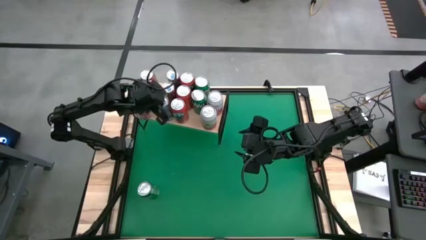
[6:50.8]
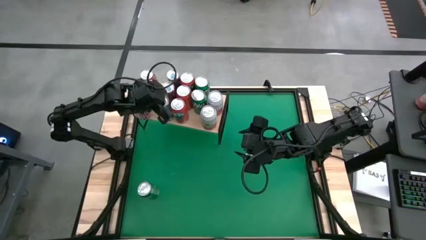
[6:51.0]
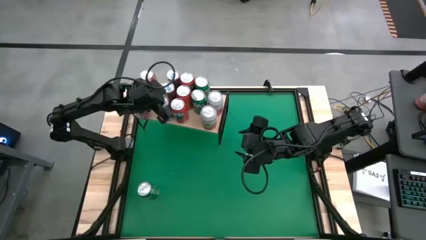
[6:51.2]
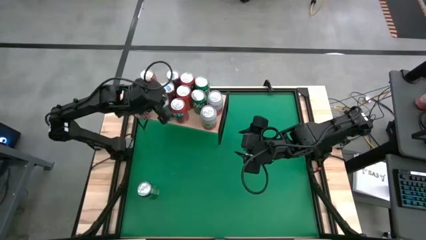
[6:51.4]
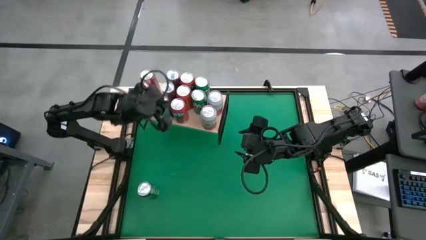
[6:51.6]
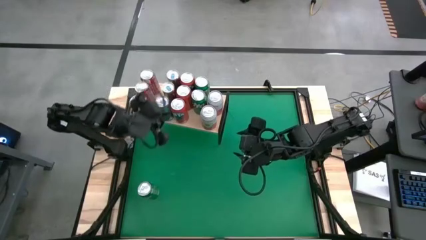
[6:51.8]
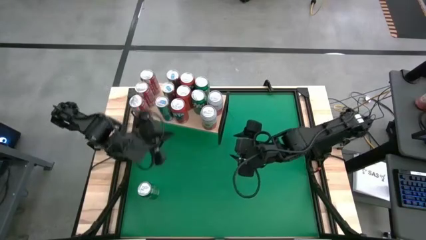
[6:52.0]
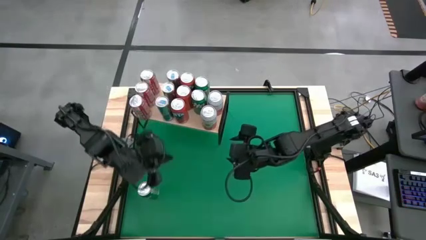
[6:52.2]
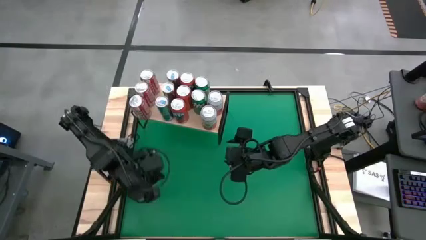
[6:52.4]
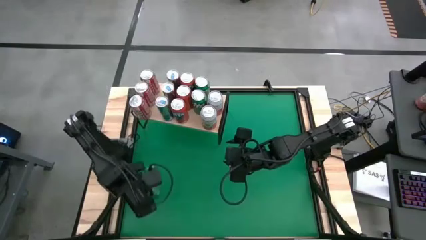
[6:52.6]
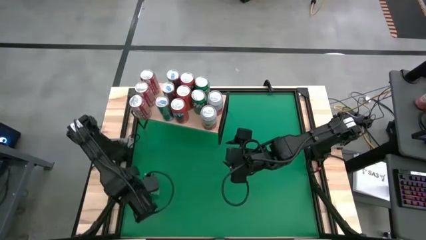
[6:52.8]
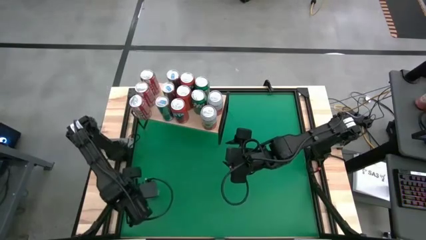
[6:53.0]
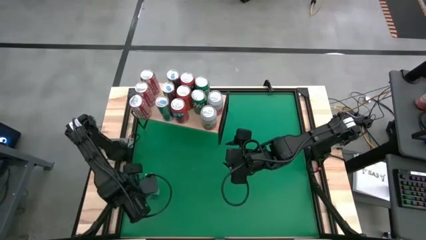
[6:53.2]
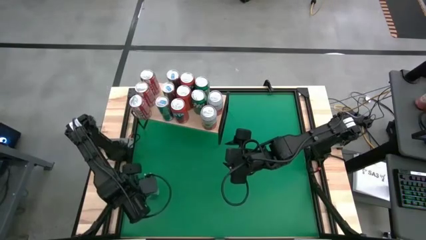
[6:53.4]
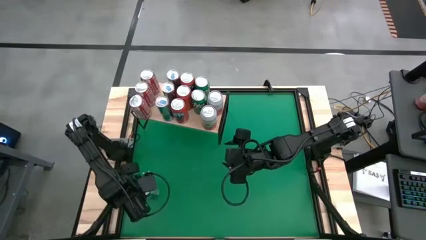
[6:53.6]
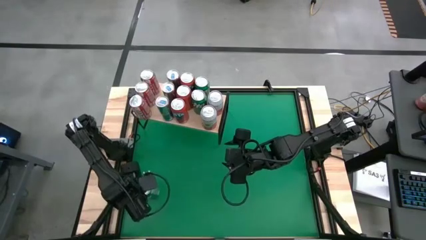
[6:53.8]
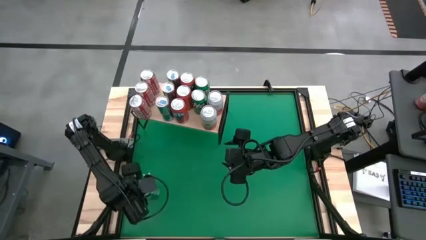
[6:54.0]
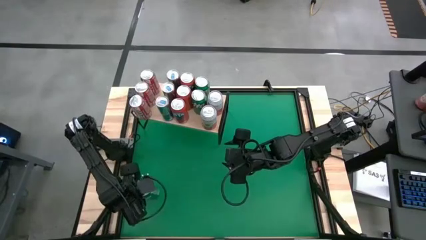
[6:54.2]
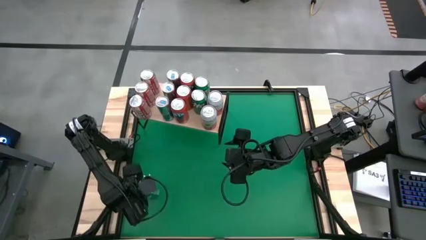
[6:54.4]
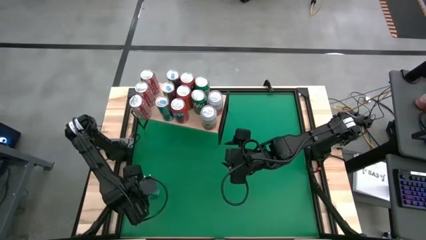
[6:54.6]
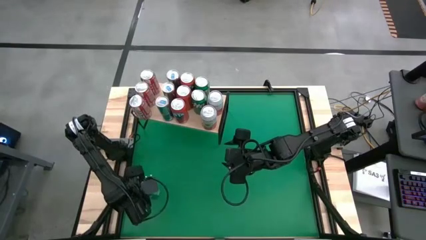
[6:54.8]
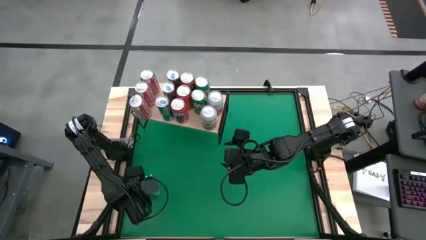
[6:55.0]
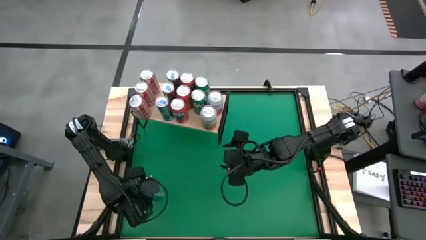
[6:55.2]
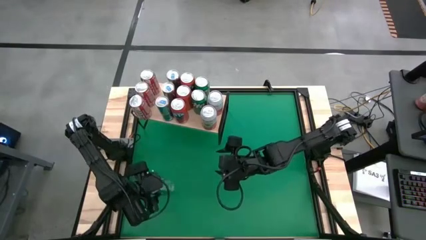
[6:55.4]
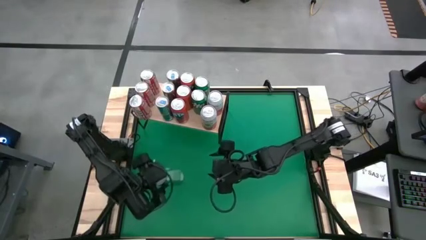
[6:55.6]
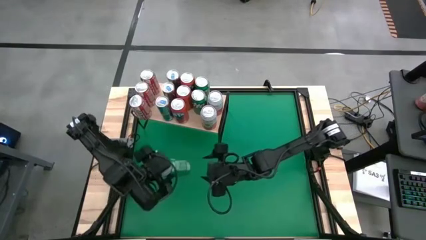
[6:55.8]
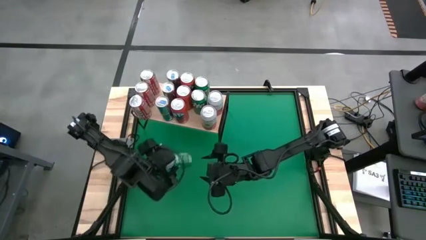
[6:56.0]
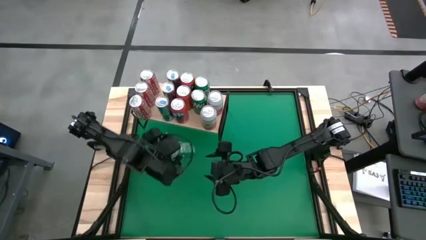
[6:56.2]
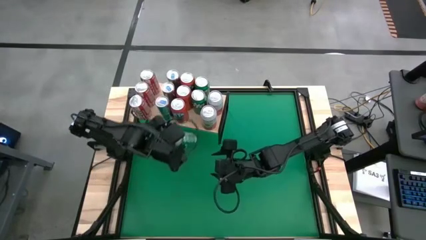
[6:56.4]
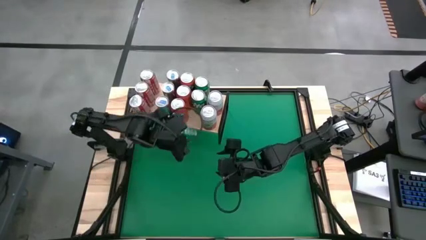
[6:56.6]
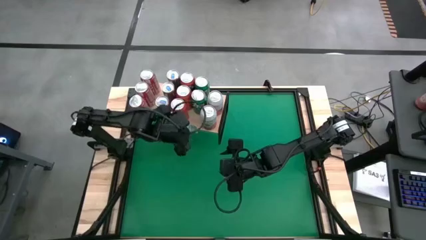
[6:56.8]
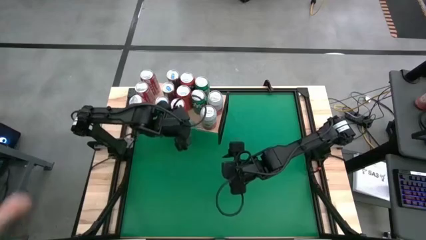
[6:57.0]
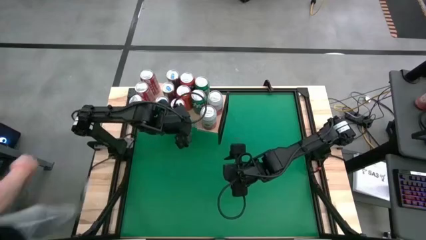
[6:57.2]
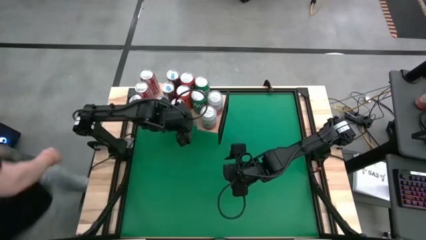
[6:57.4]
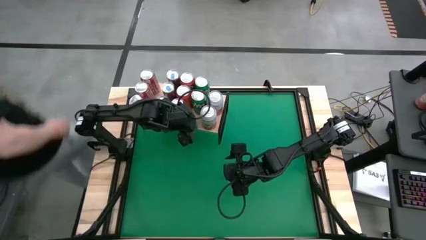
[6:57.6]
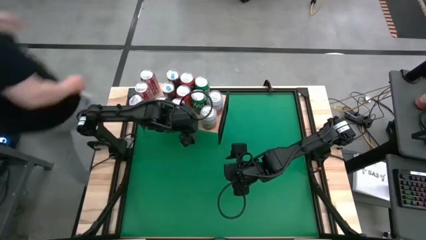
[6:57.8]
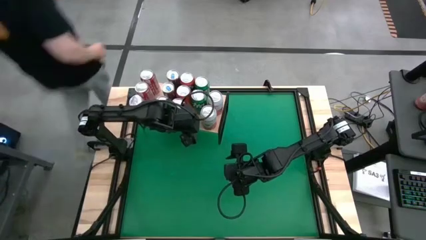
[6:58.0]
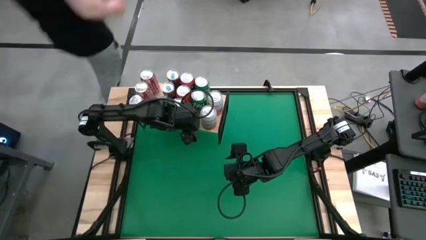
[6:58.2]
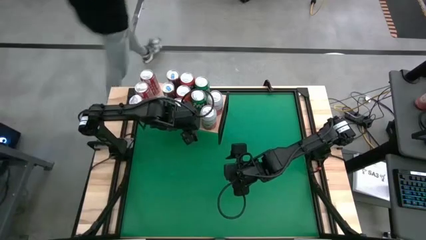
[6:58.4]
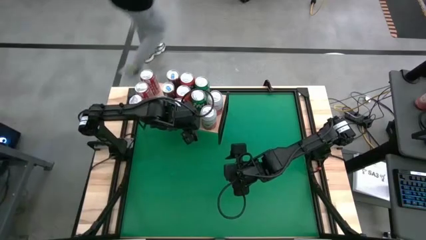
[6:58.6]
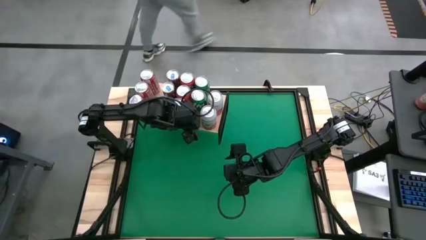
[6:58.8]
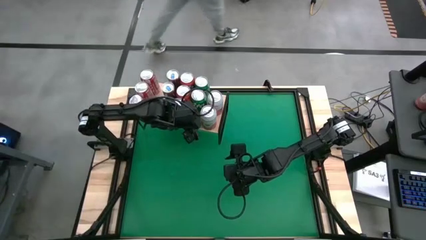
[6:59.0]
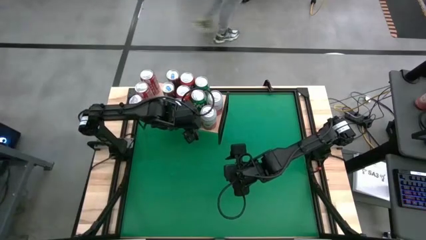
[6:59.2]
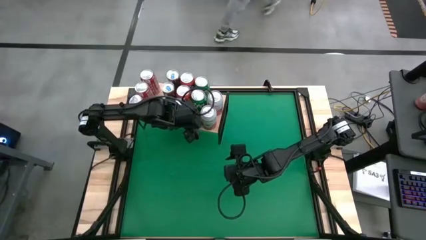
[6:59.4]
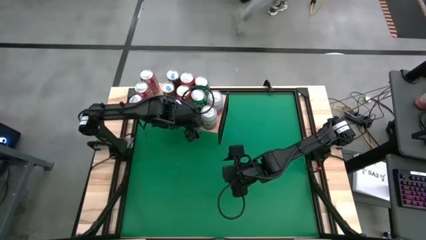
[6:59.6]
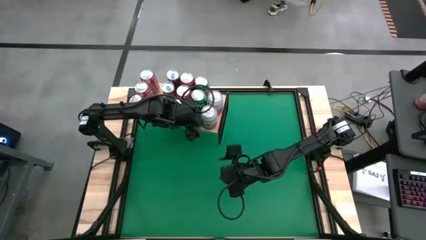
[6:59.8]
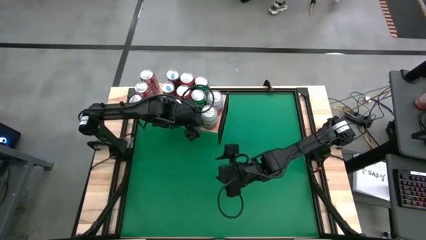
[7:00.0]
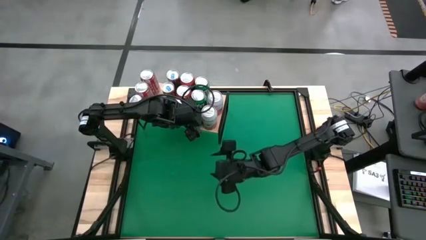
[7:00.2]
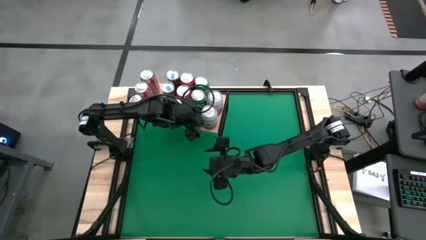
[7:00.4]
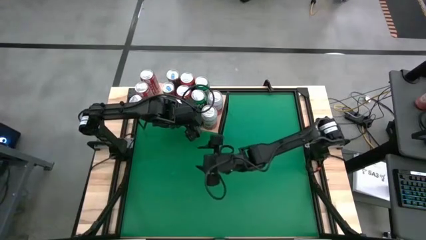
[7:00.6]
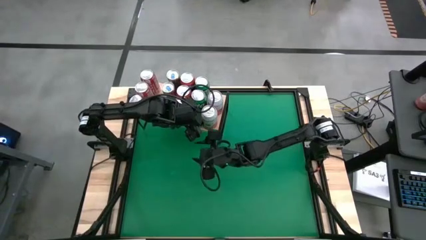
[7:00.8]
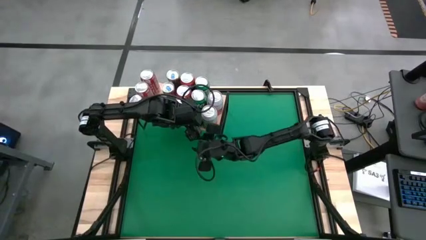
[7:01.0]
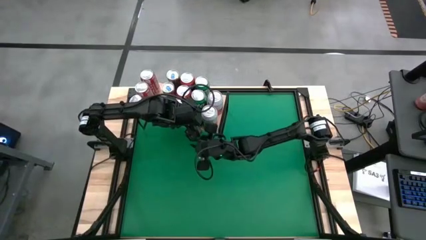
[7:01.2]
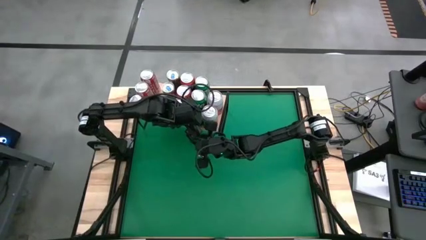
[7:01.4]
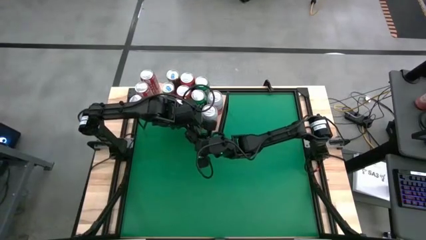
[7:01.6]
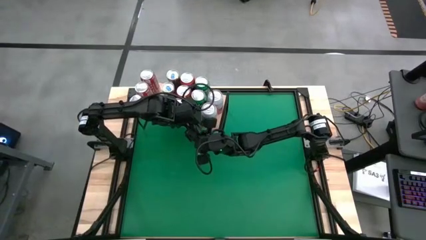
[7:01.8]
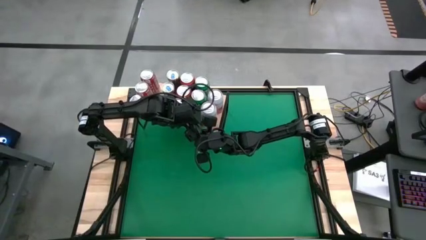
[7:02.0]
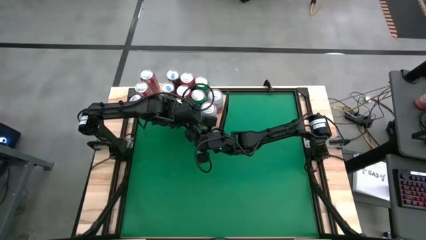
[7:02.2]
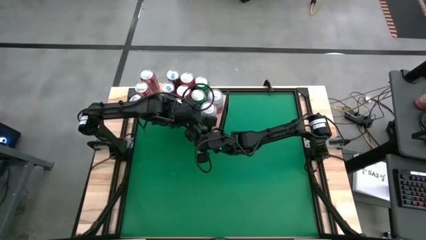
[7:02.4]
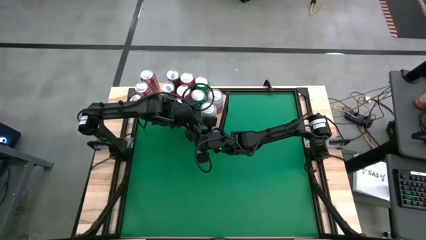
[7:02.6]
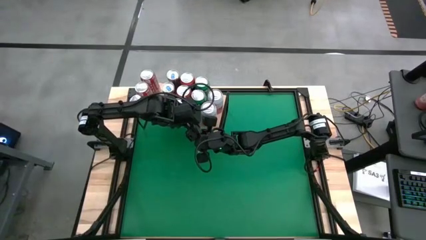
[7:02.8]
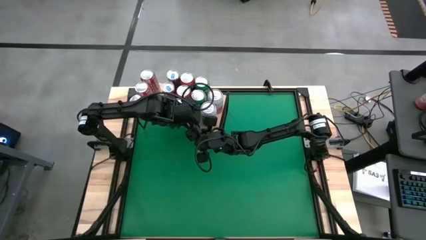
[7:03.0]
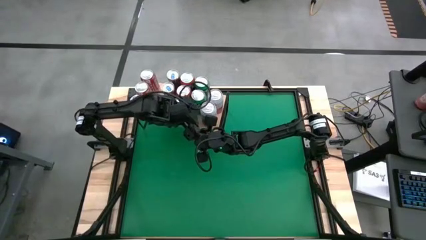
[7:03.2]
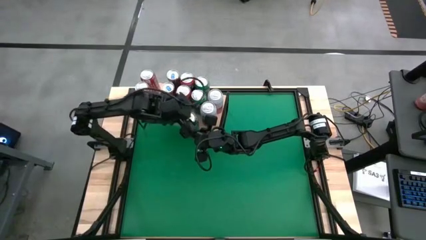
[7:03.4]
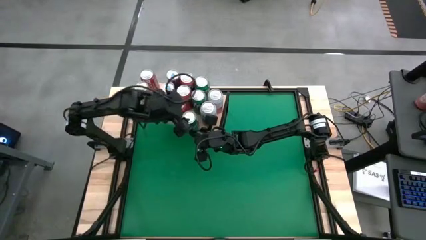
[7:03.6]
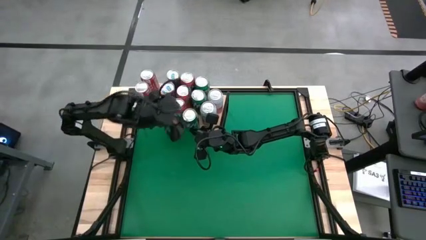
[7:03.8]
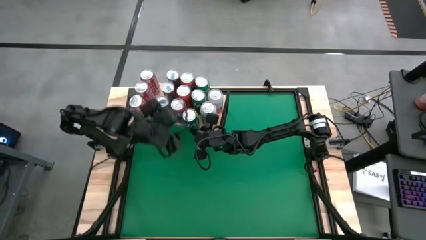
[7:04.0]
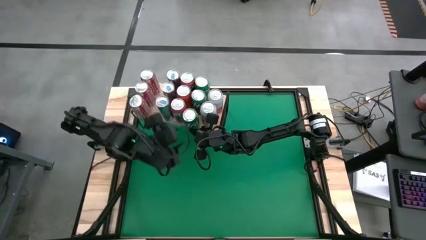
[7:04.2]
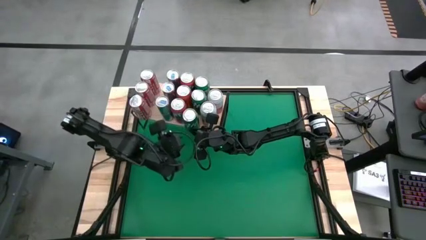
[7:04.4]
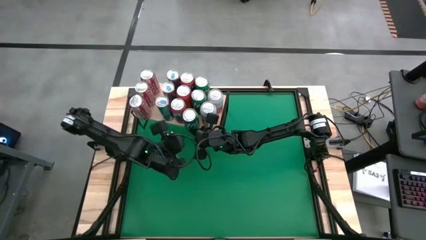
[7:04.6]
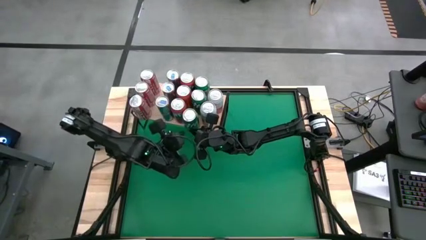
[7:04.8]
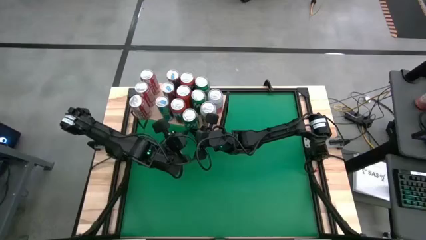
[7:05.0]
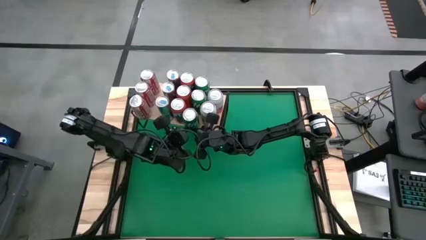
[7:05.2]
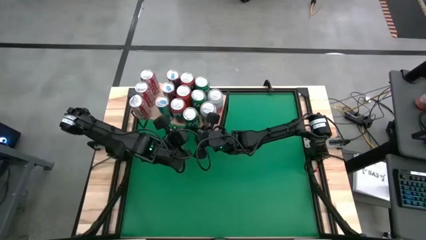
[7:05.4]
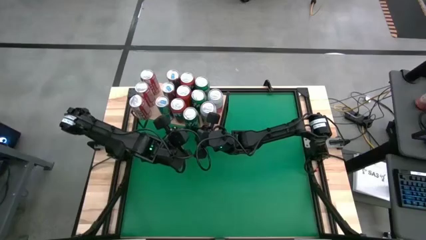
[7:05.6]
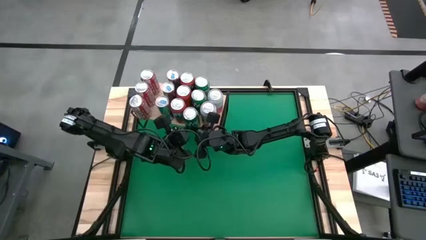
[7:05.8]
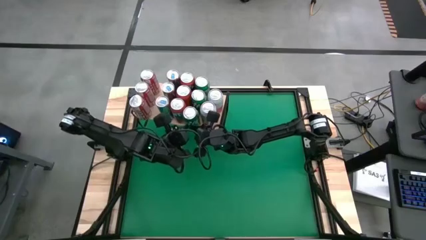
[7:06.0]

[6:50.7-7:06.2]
Task: Place canned beverage on shelf
Put the green soda can on the shelf aligned with the other green soda can
